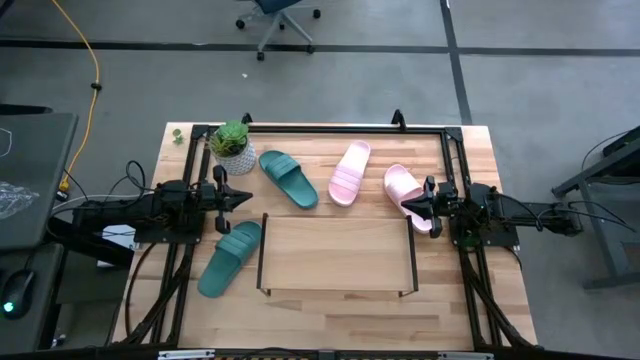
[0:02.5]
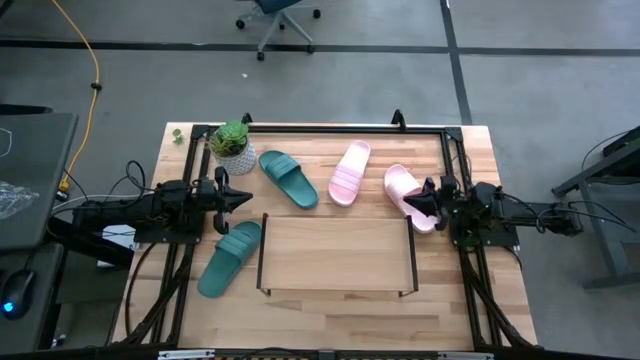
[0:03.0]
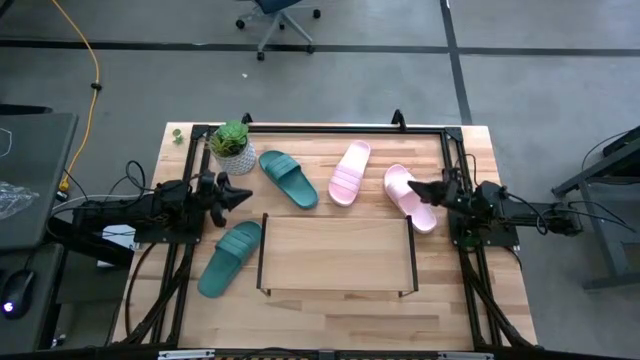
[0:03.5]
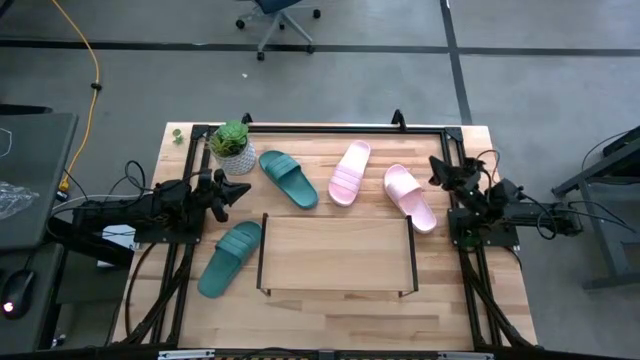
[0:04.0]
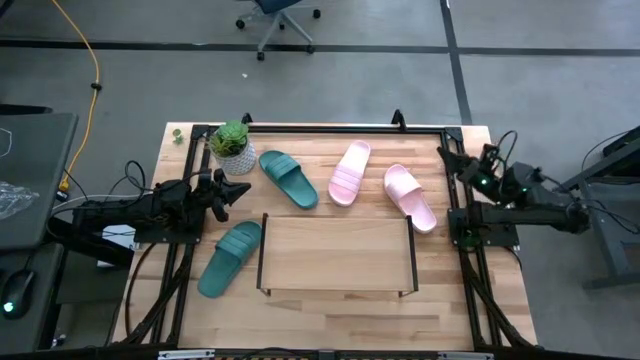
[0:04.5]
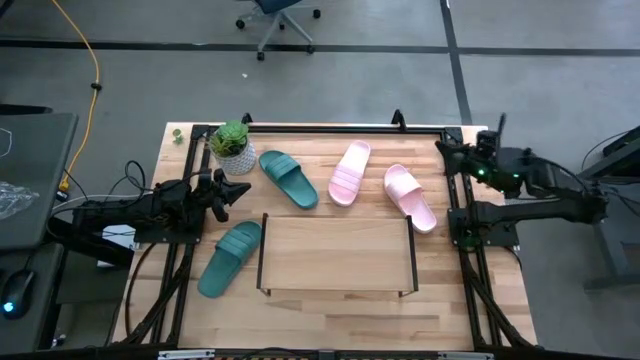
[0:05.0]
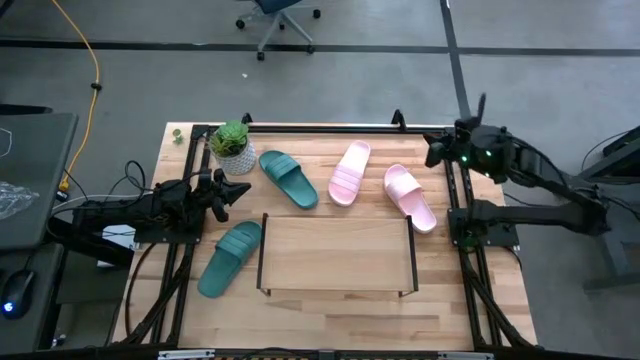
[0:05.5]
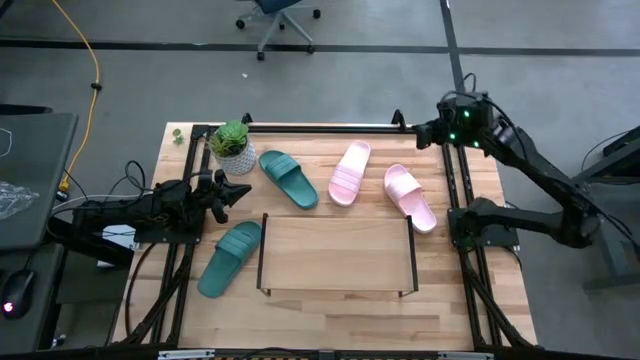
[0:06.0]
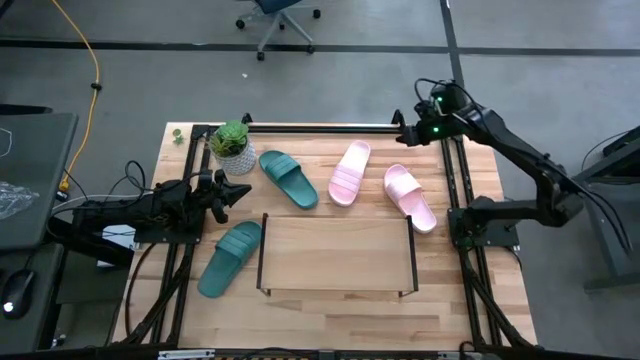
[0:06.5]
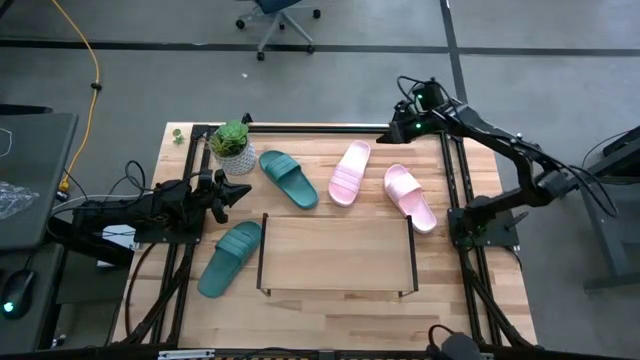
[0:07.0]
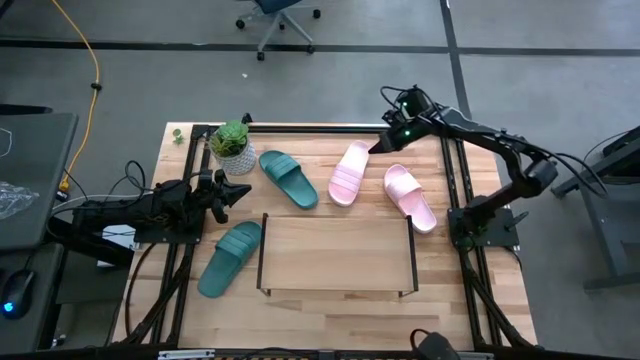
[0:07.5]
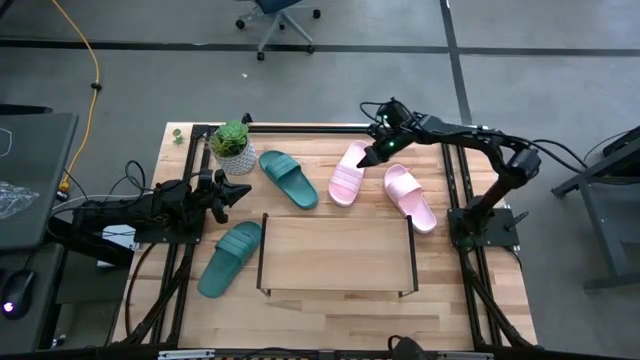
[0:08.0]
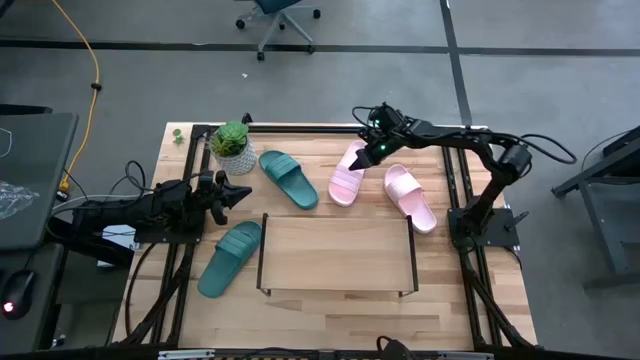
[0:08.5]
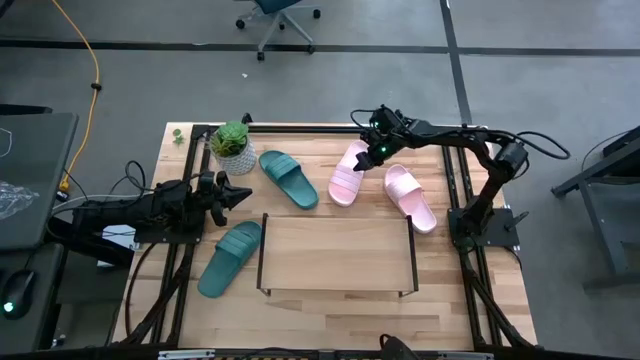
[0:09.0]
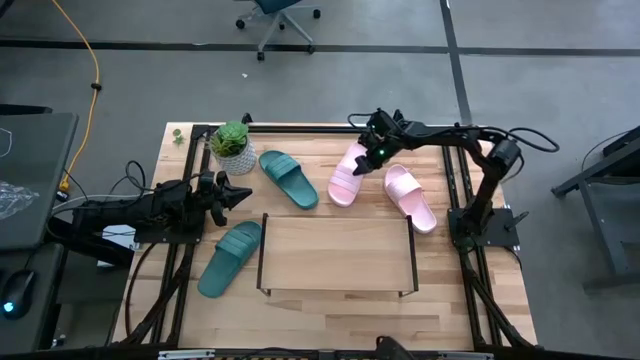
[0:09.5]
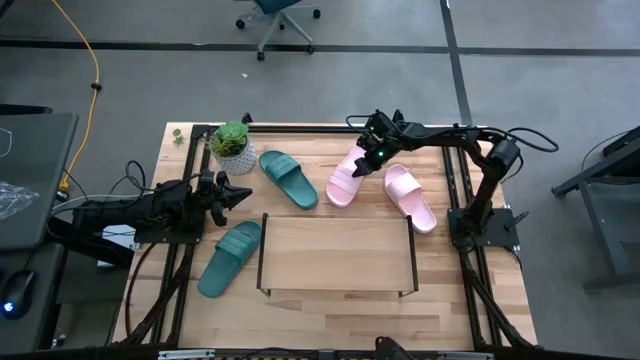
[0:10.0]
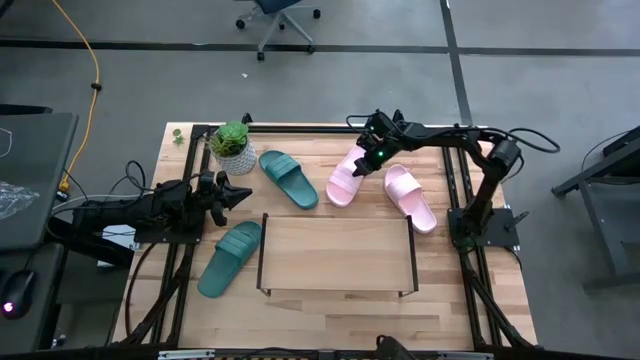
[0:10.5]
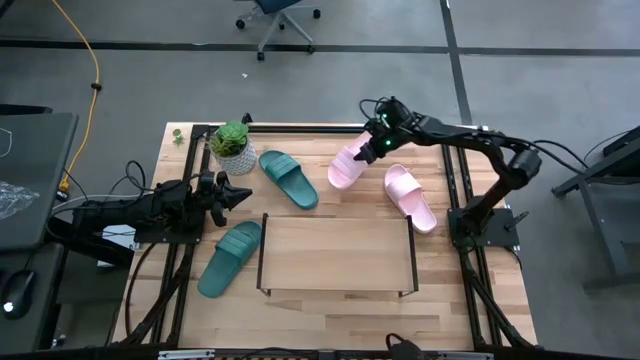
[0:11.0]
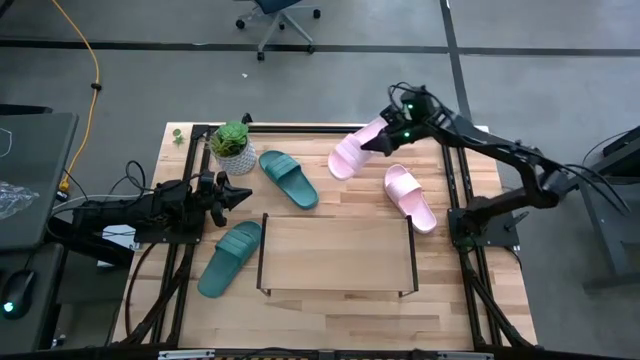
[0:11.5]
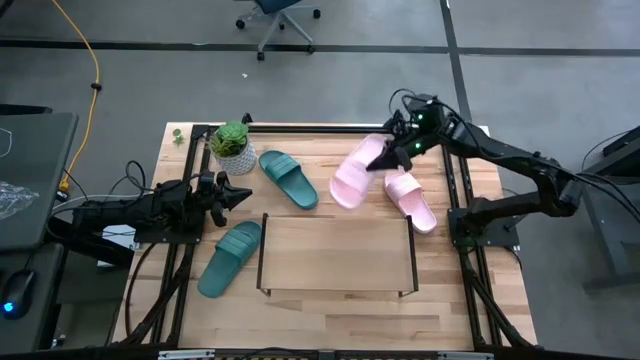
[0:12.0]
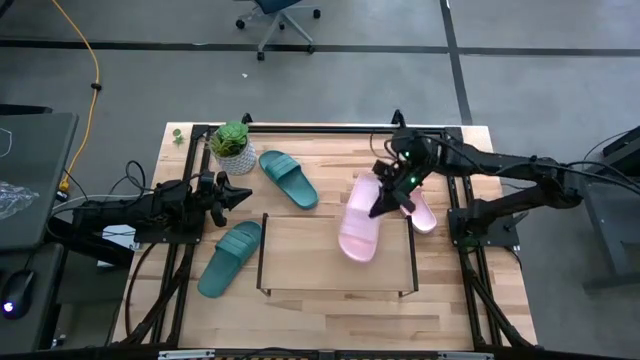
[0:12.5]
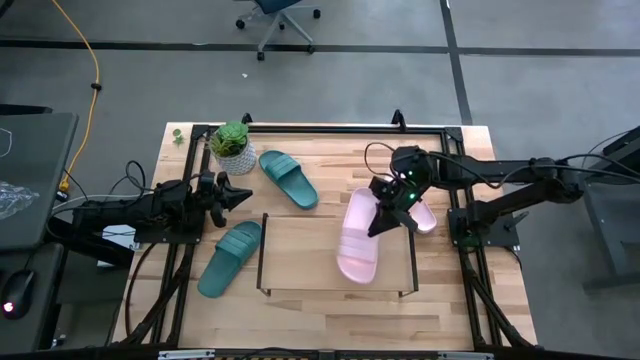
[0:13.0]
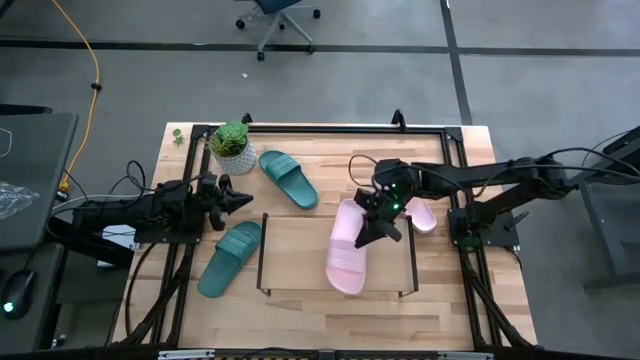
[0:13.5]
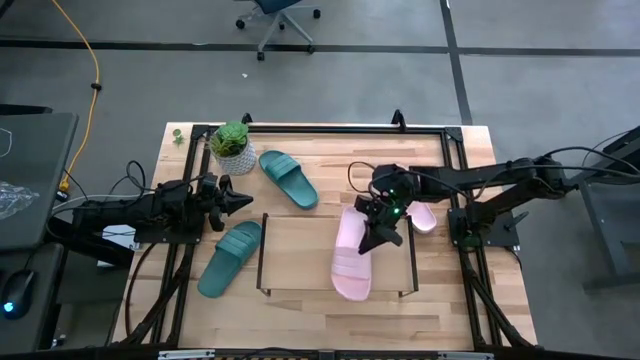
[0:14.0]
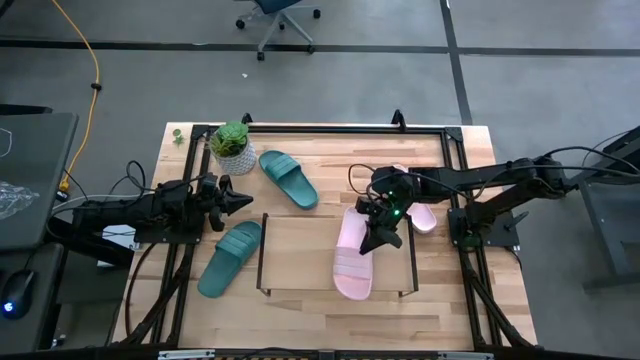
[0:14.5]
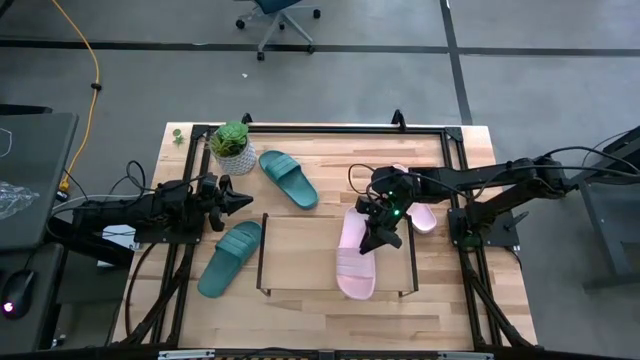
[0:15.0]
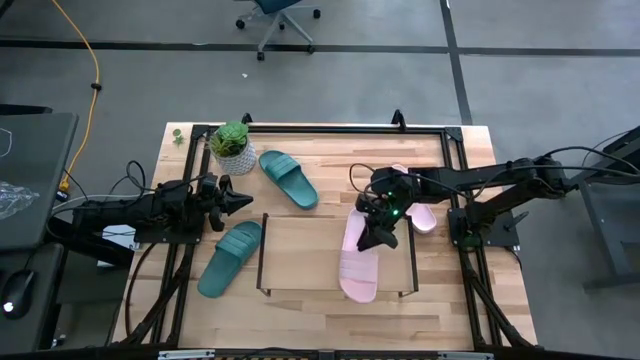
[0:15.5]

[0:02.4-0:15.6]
Task: Pick and place slides into the shelf
Put the left pink slide on the shelf

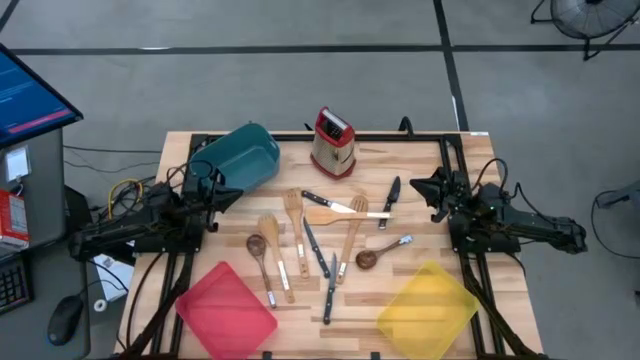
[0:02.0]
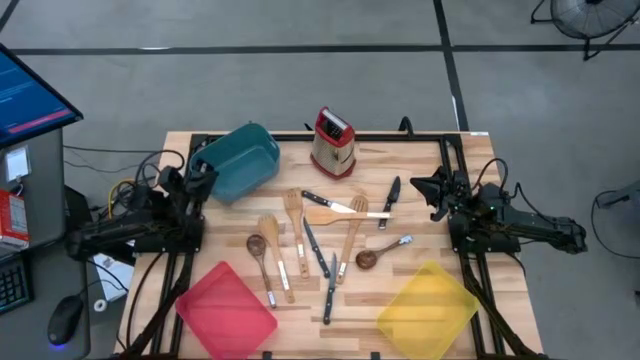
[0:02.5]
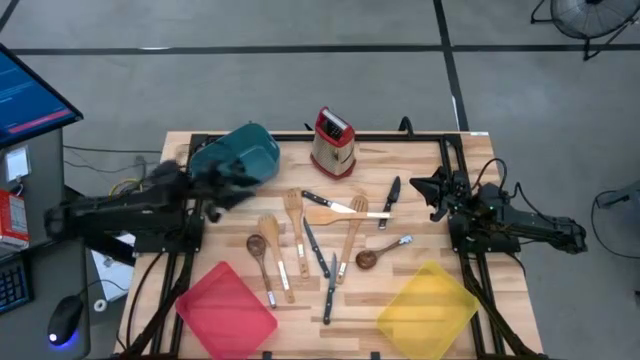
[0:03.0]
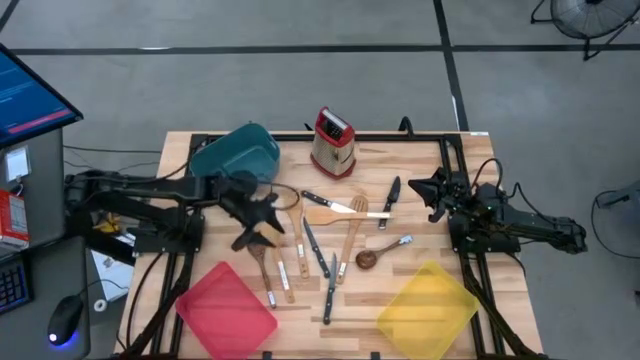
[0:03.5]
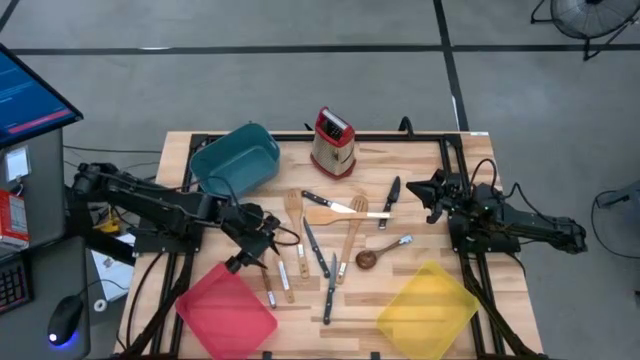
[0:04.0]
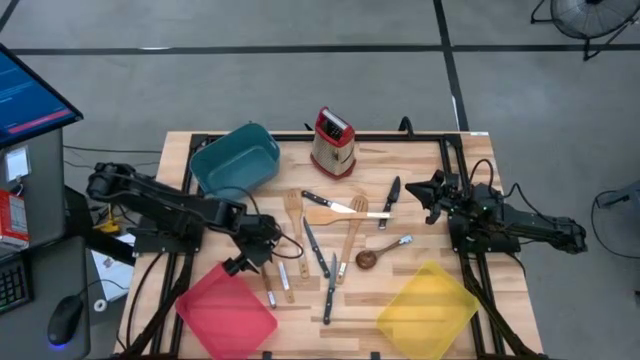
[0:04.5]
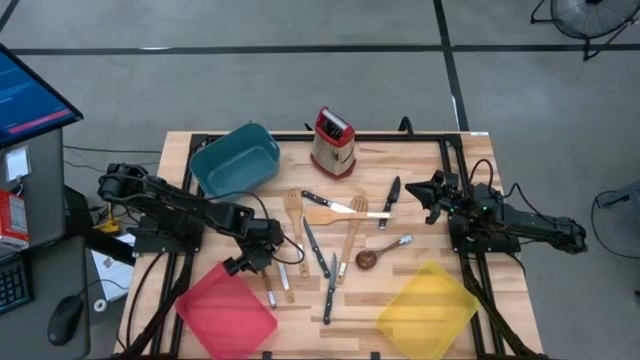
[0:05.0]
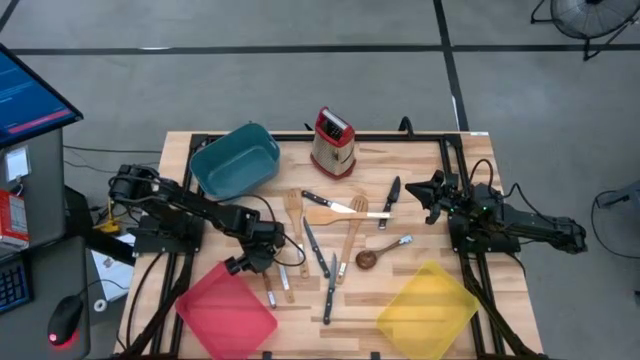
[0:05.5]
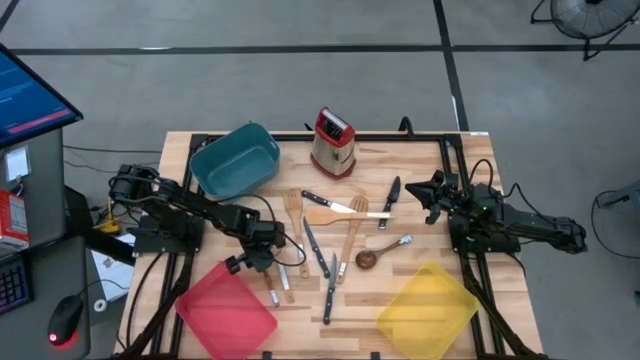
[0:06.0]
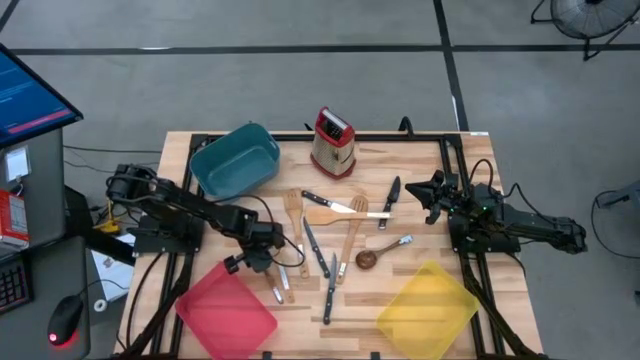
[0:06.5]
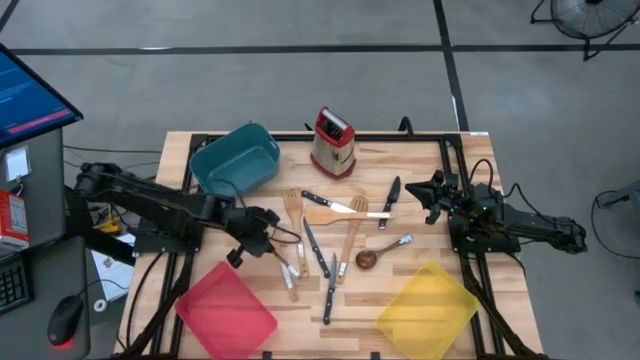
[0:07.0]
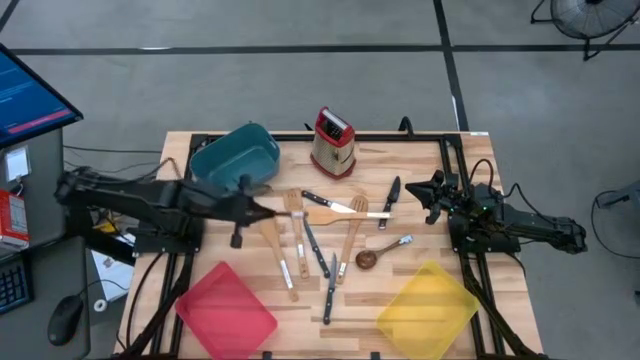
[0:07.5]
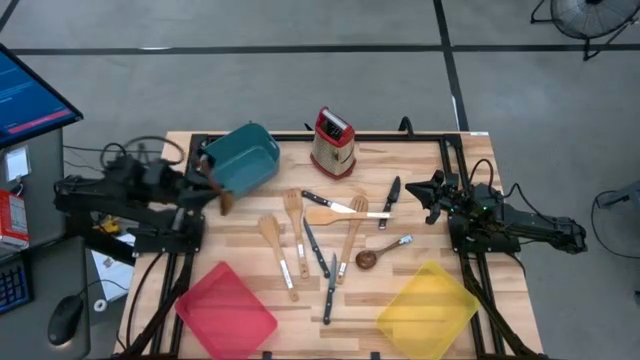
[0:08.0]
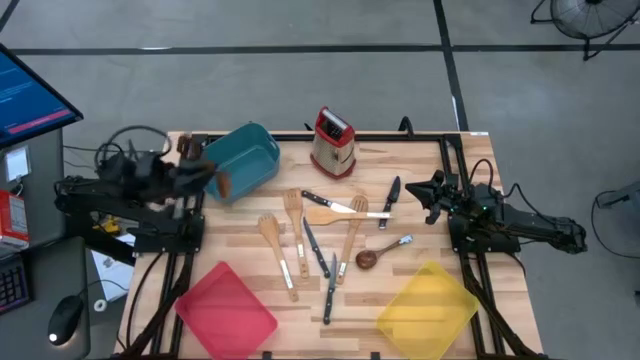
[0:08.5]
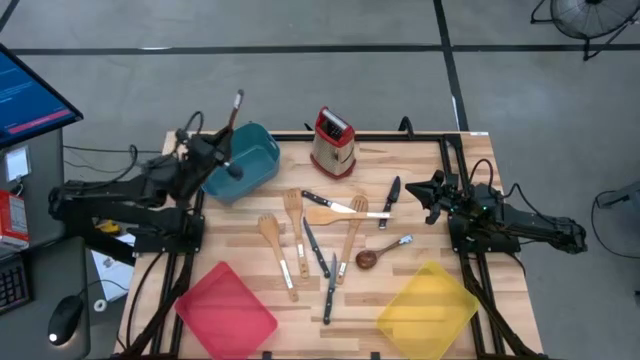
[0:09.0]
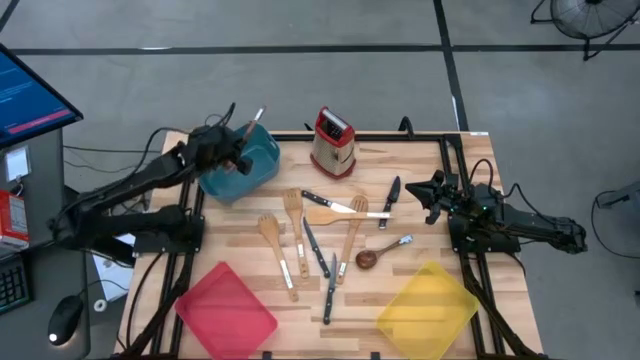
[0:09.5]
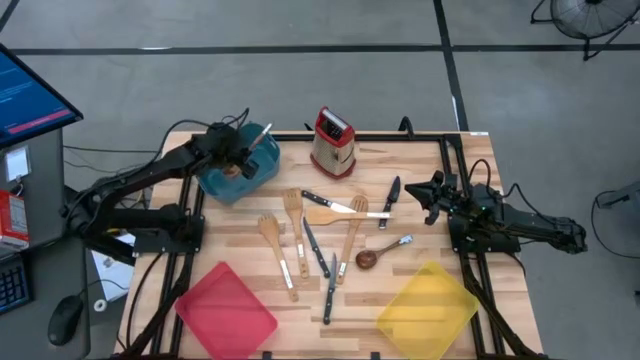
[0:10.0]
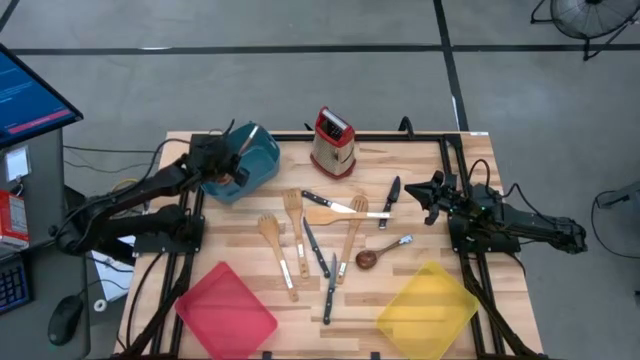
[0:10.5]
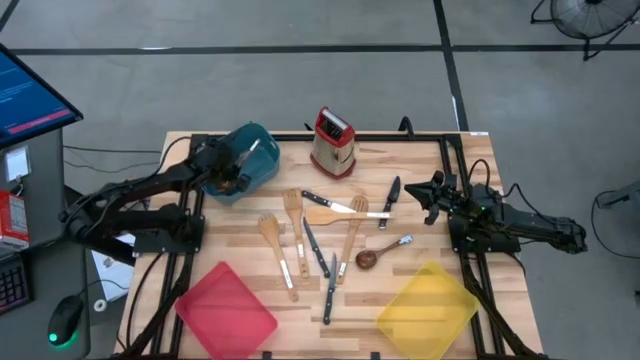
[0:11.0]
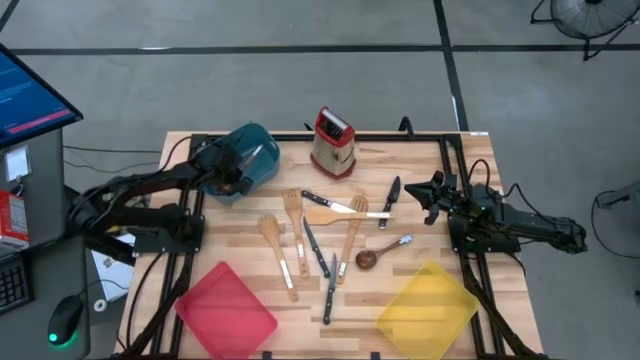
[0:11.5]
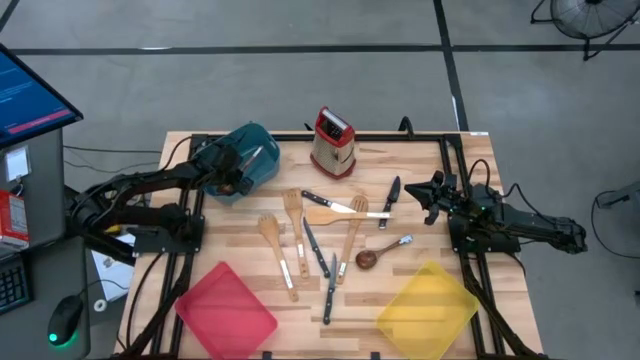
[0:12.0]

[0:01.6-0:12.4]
Task: Pick & Place Kitchen Items
Put the brown wooden serving spoon into the blue bin
